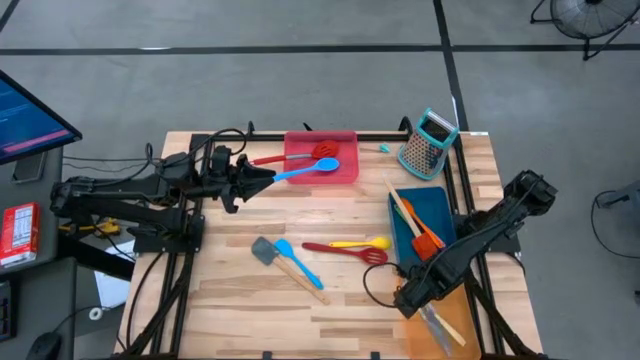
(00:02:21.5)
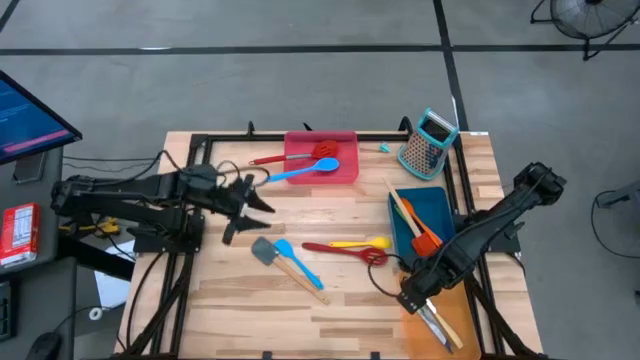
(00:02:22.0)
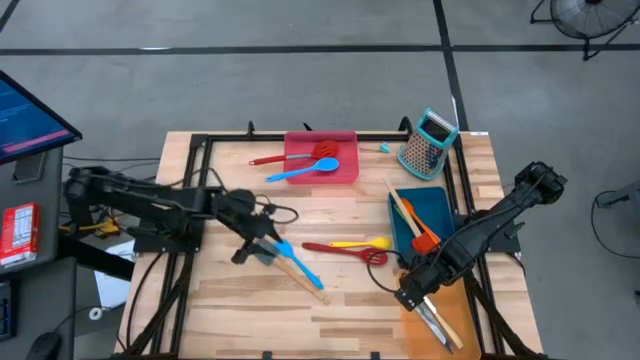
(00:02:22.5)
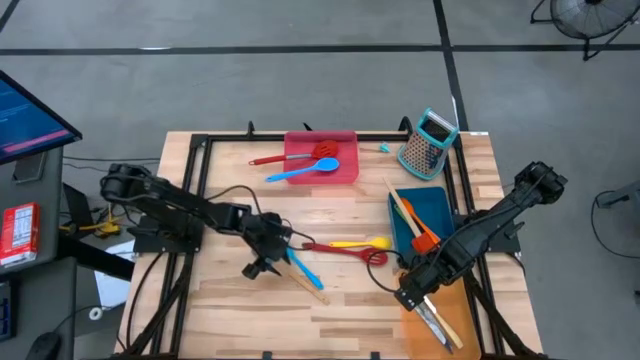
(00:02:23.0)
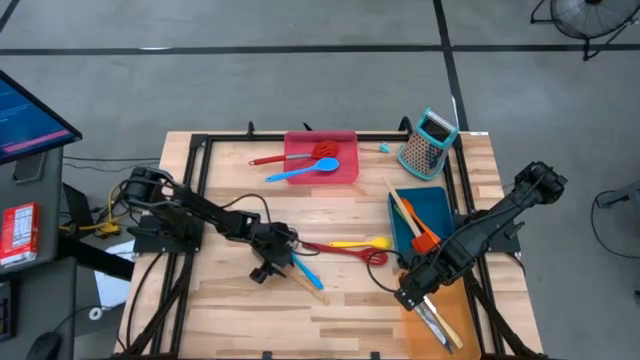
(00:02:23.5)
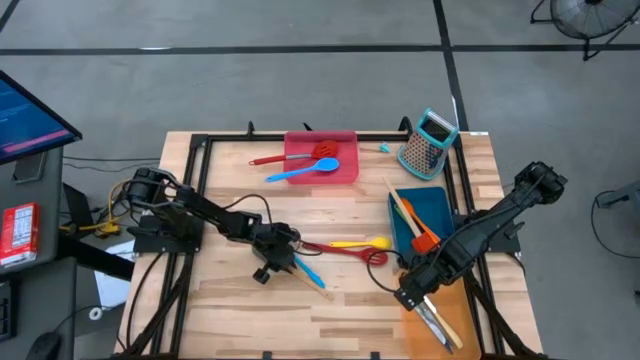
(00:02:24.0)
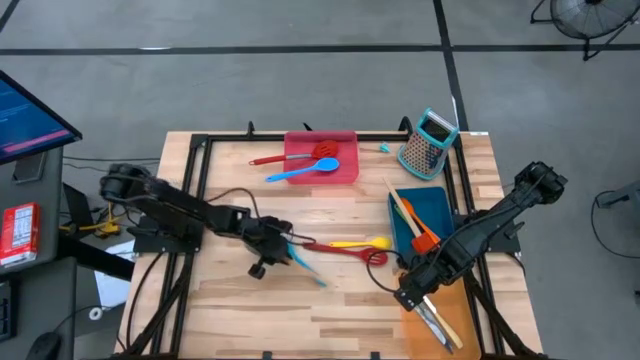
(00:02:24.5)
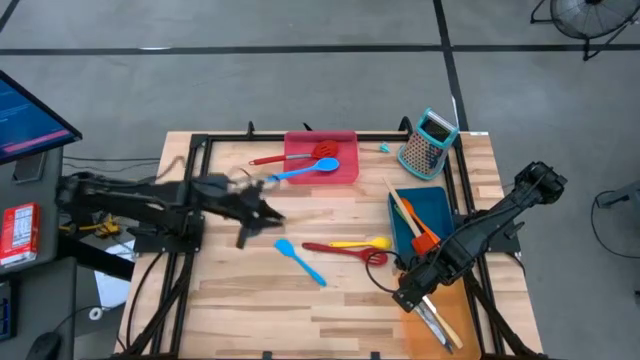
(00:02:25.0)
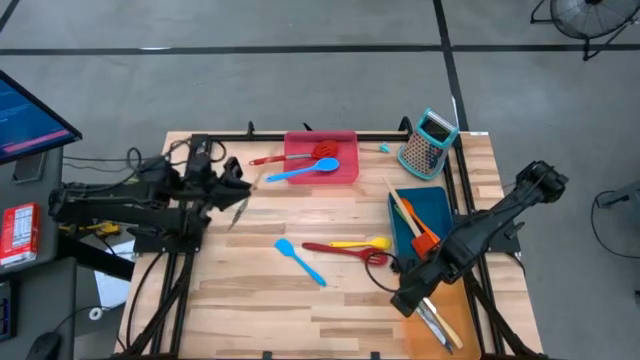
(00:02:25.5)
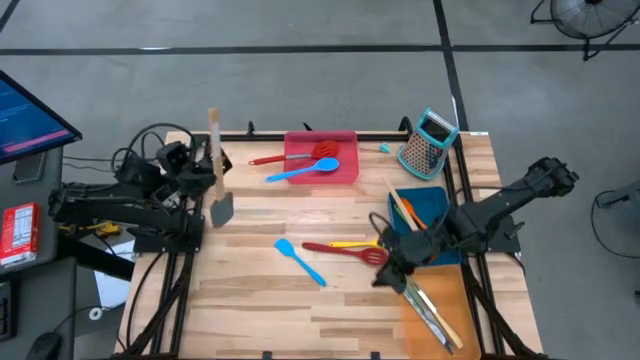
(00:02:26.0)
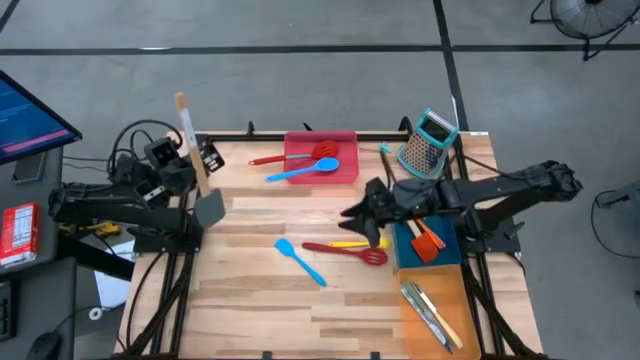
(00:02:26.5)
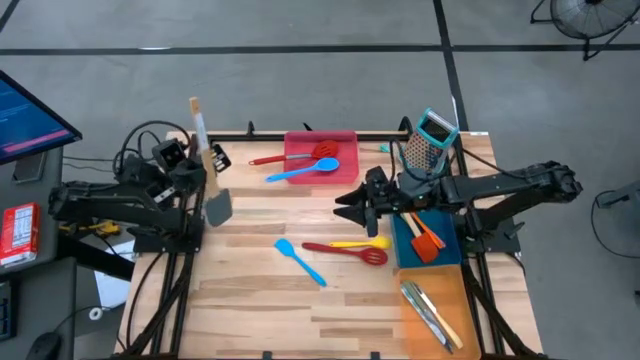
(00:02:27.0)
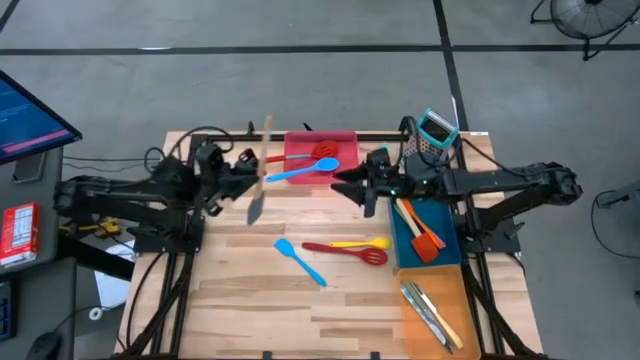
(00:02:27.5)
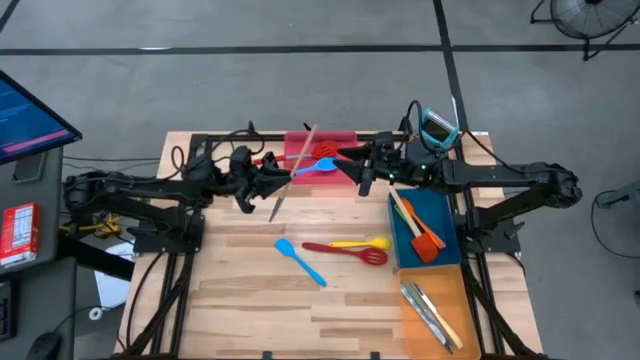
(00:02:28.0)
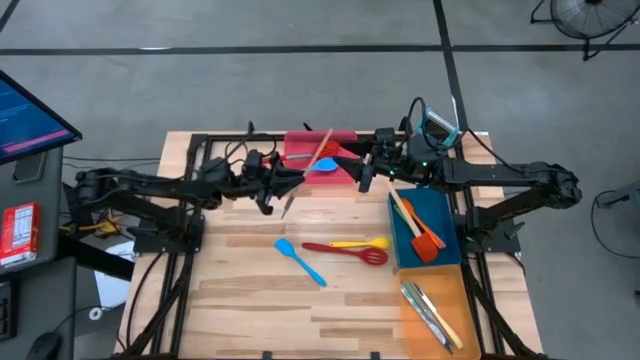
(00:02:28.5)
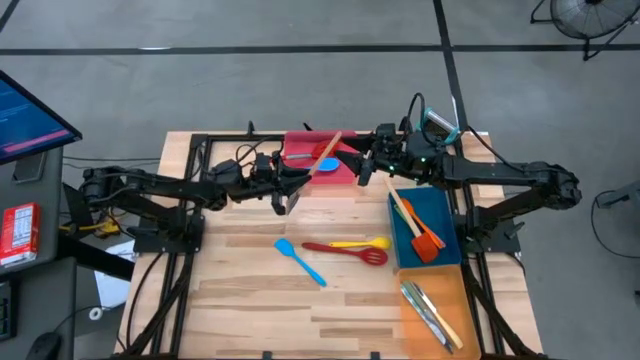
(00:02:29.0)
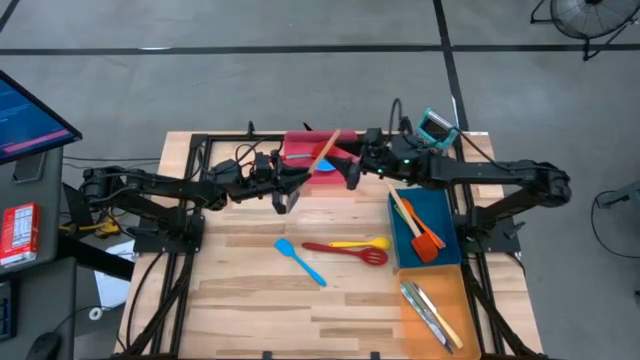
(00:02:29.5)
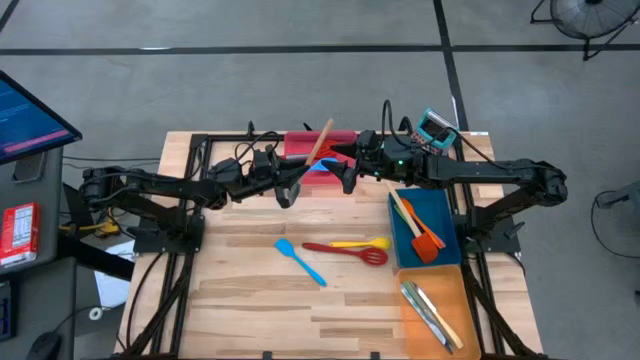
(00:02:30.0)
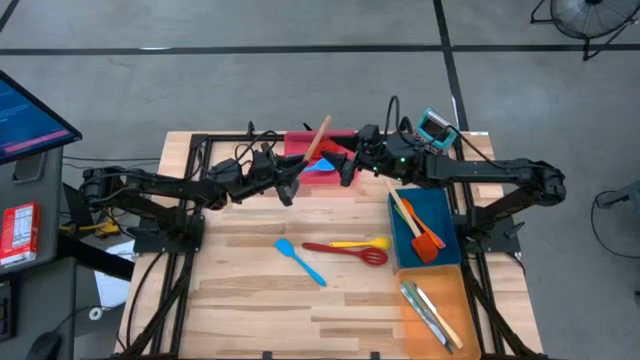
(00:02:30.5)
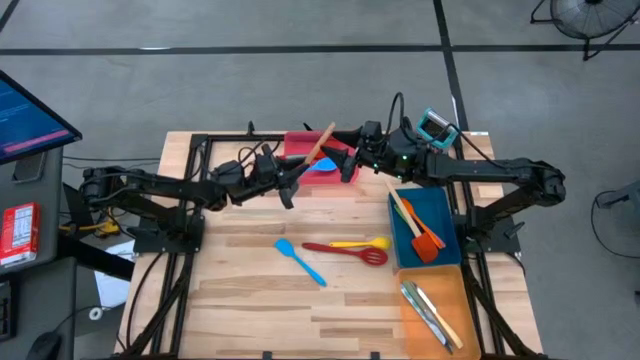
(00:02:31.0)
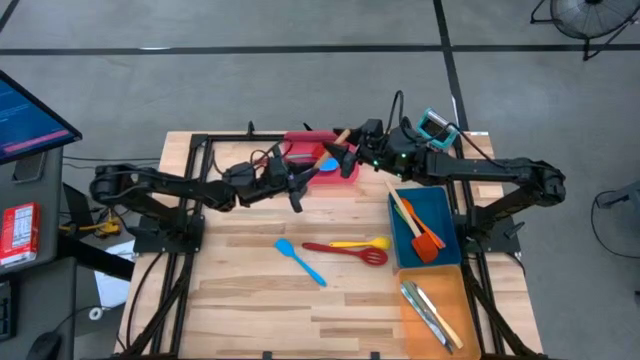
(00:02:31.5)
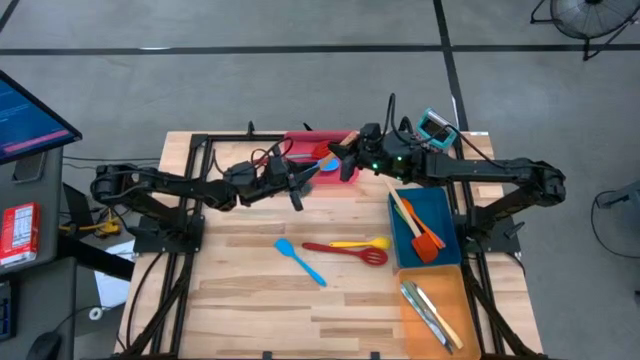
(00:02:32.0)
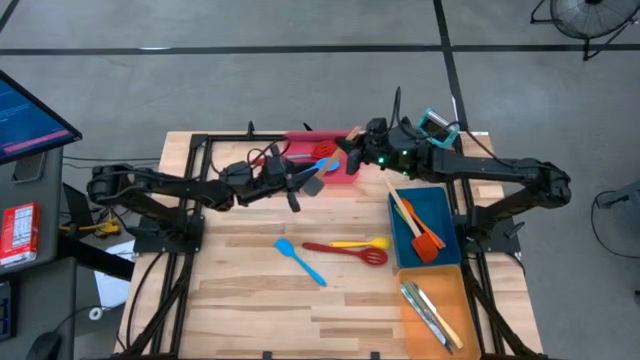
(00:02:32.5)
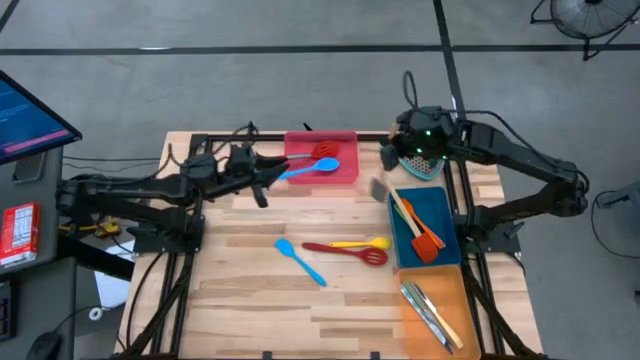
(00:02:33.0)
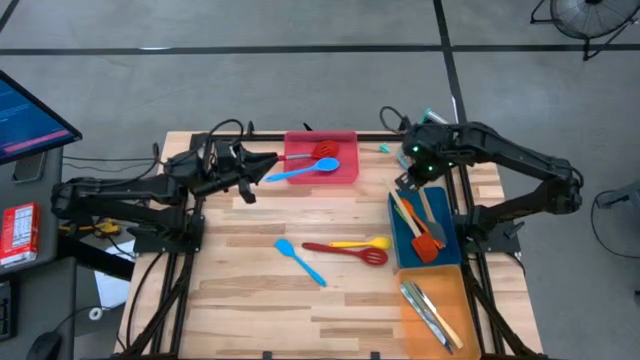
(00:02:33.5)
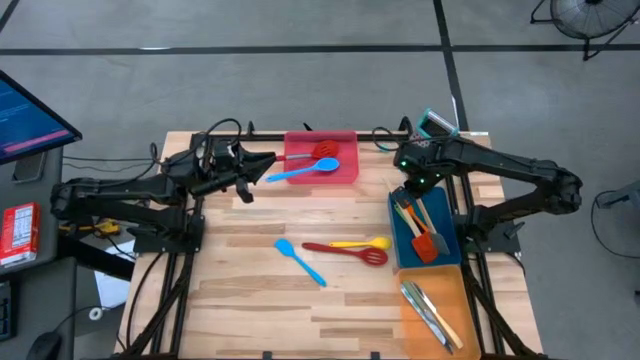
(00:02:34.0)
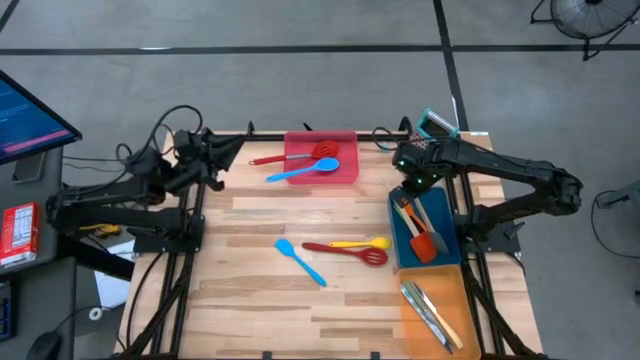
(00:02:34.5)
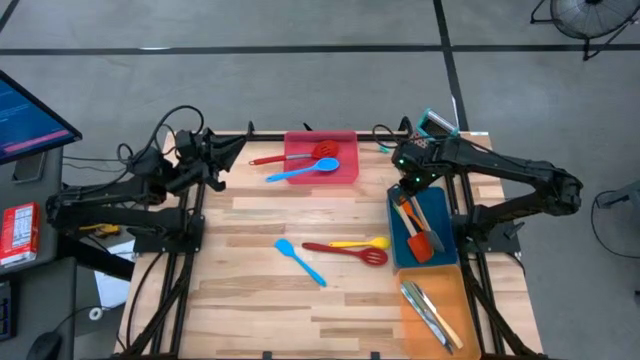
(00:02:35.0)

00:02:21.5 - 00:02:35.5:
Task: Pick & Place Kitchen Items
Put the gray spatula into the blue bin

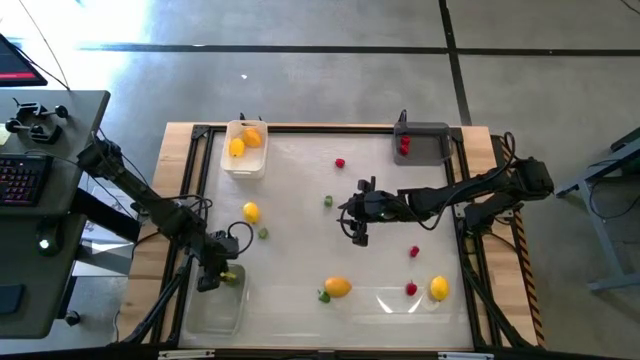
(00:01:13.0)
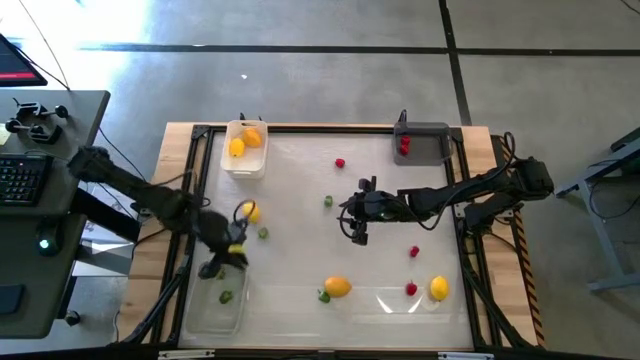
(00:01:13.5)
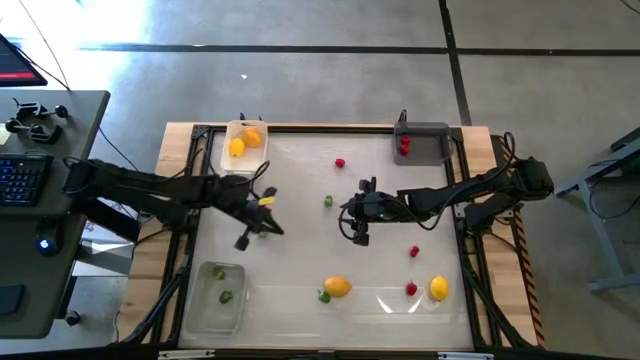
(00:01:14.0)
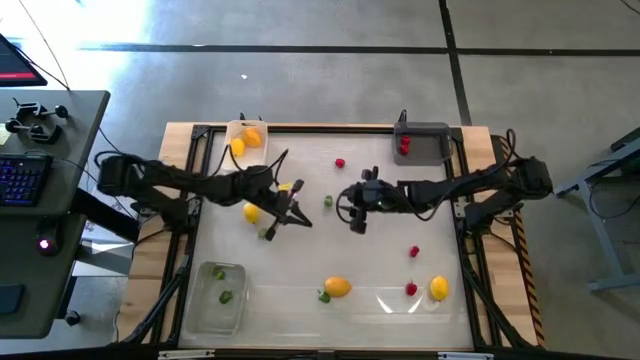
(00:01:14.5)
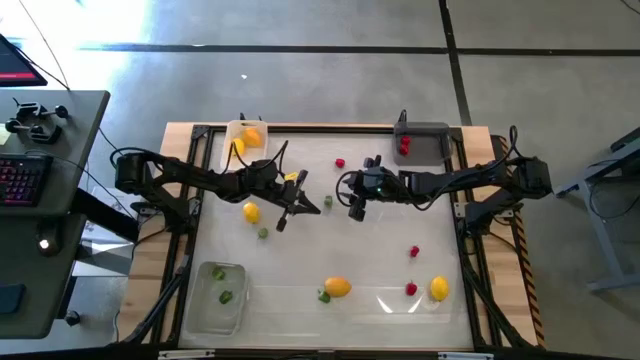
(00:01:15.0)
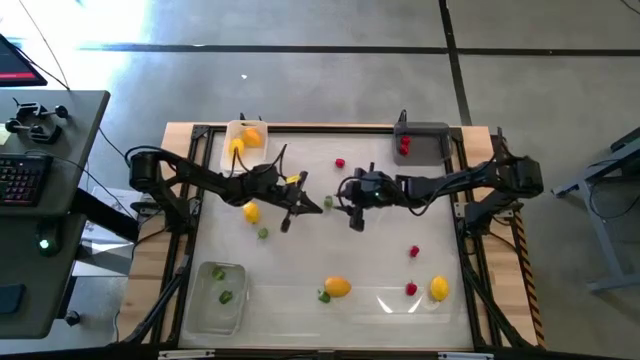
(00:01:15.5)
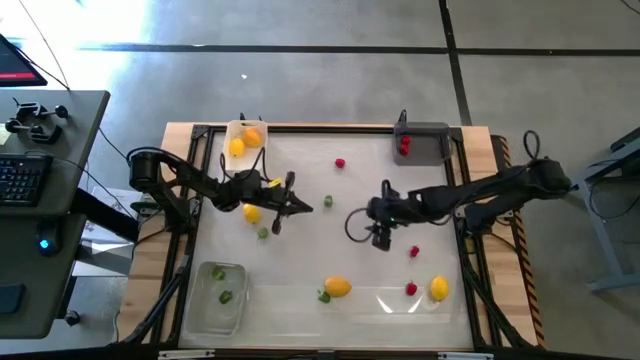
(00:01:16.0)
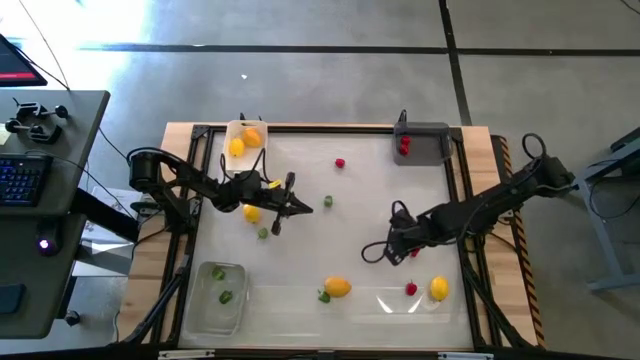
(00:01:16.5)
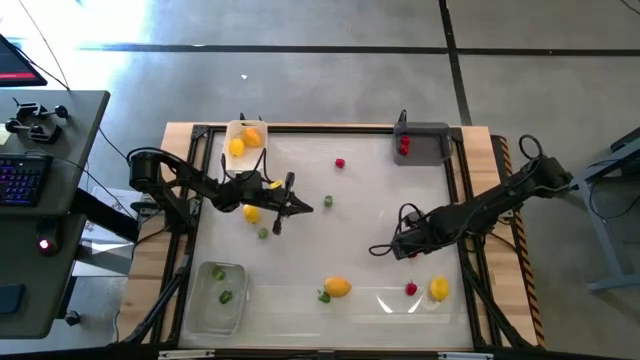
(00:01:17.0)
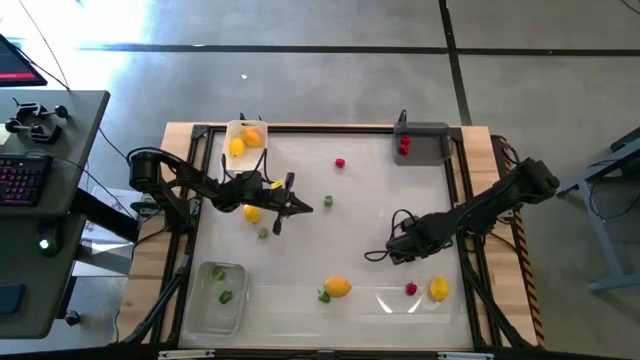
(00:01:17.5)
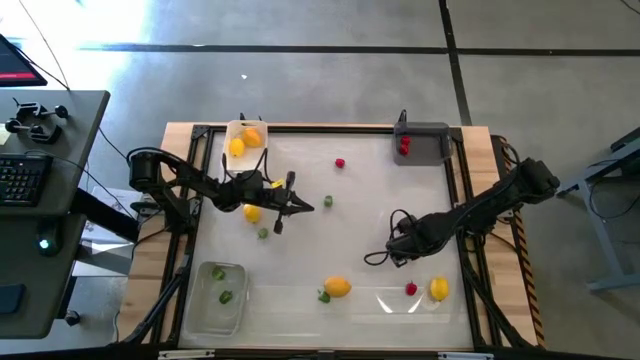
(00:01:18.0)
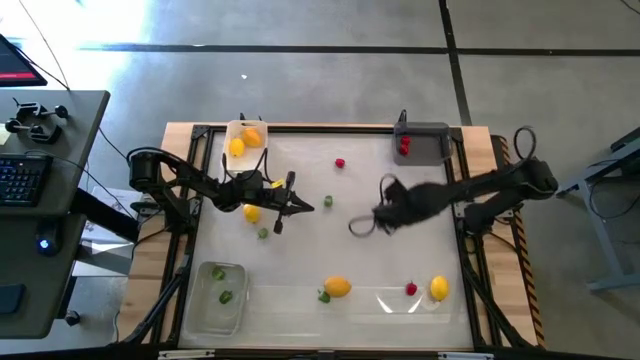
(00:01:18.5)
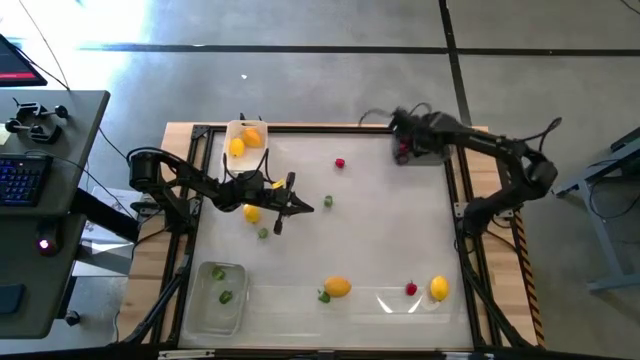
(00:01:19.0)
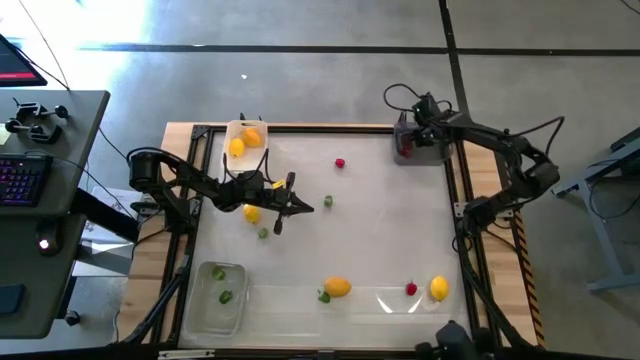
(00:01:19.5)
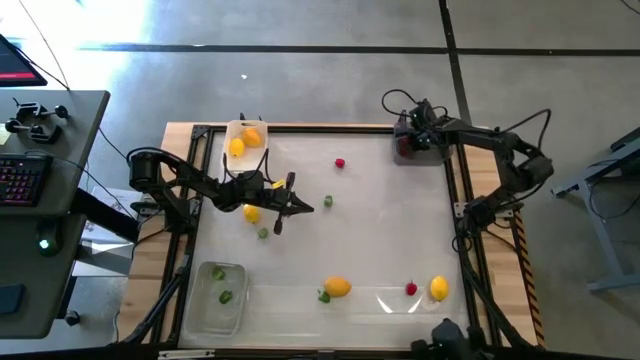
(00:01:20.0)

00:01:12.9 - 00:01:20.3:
Task: Sort produce into baskets
Put the red bell pepper into the black bin
